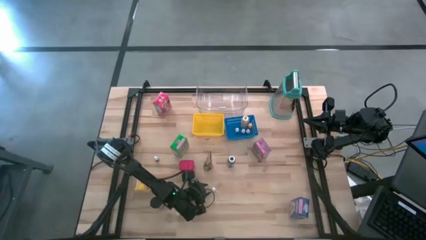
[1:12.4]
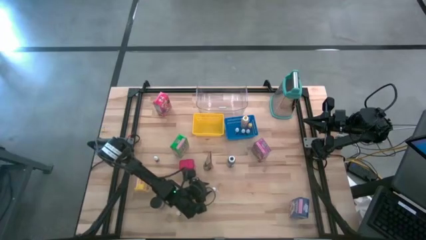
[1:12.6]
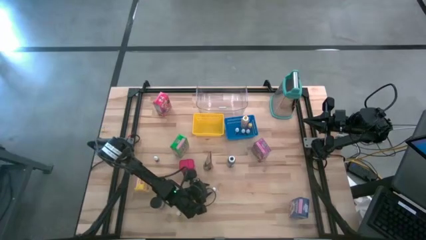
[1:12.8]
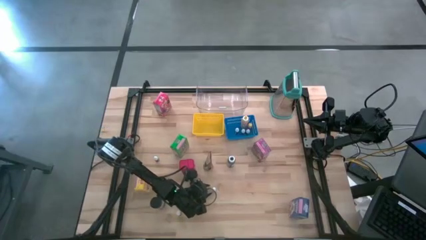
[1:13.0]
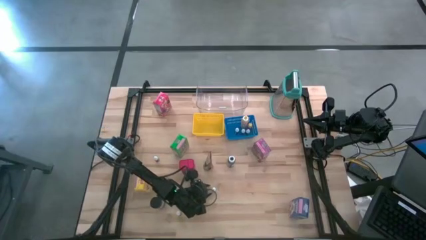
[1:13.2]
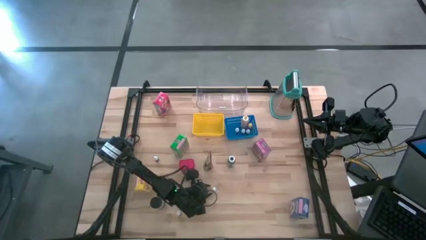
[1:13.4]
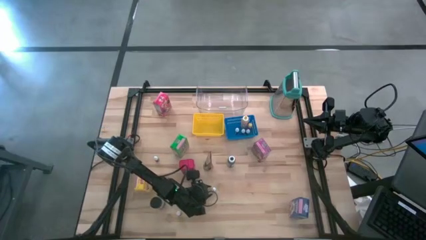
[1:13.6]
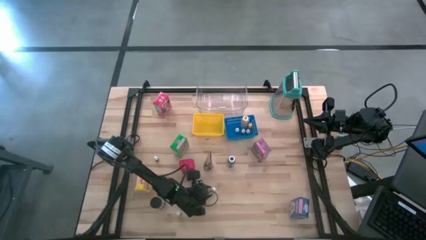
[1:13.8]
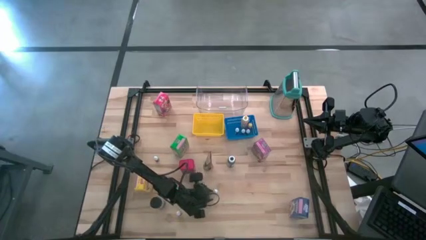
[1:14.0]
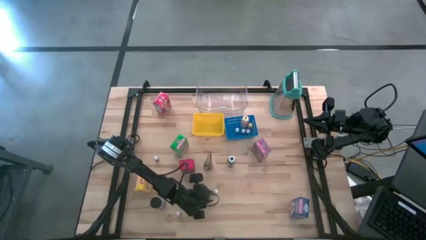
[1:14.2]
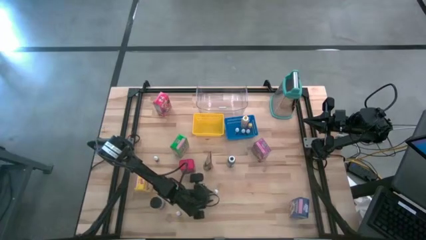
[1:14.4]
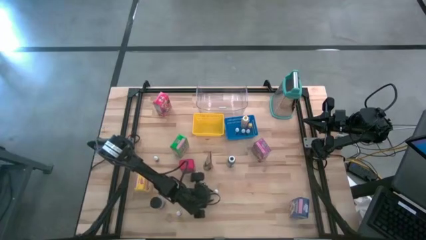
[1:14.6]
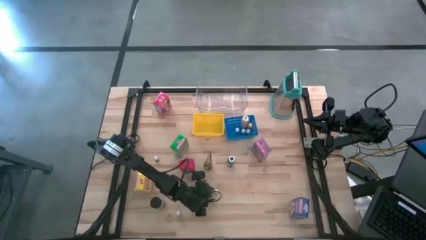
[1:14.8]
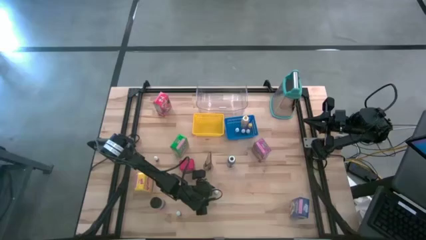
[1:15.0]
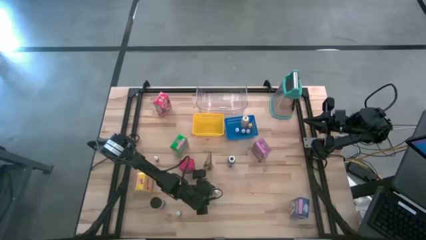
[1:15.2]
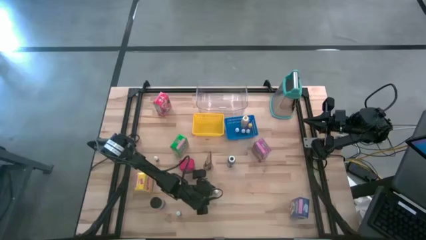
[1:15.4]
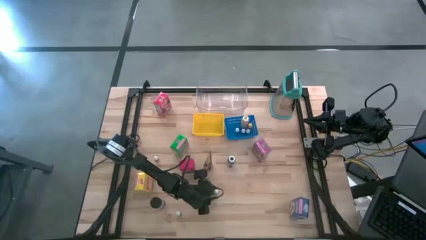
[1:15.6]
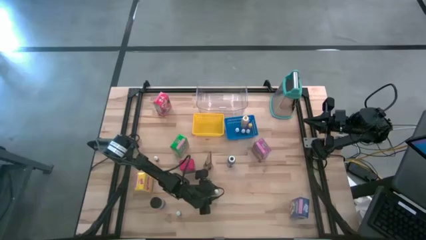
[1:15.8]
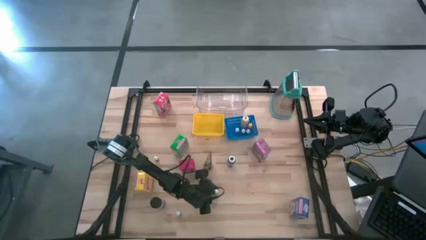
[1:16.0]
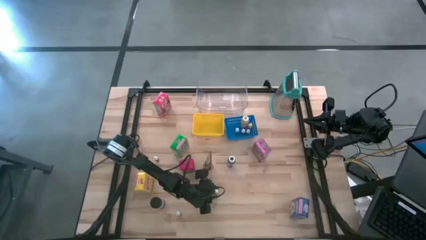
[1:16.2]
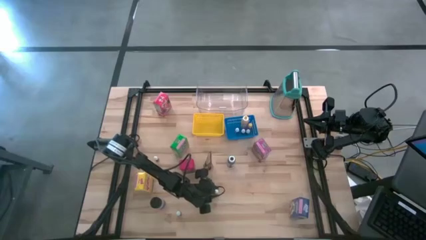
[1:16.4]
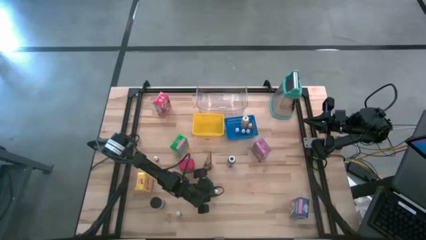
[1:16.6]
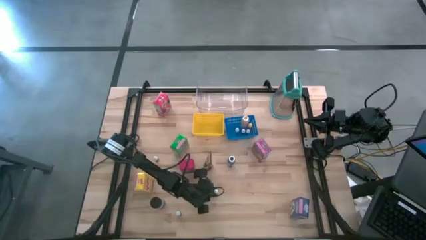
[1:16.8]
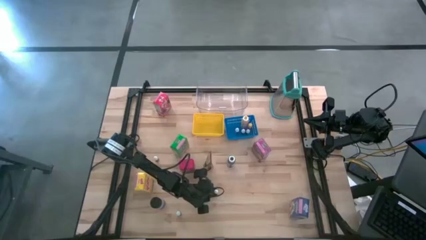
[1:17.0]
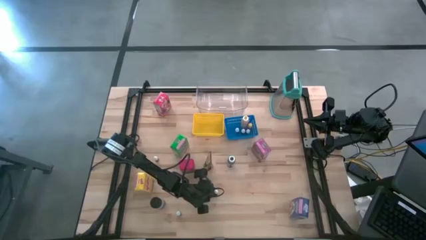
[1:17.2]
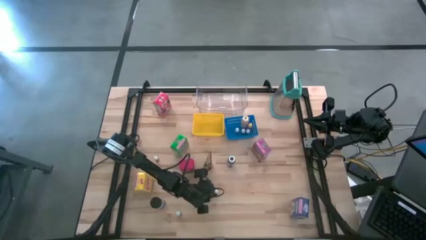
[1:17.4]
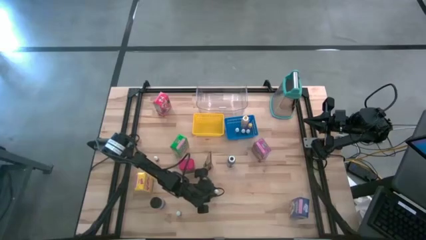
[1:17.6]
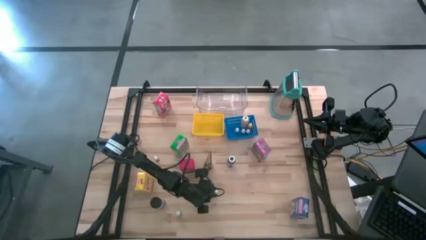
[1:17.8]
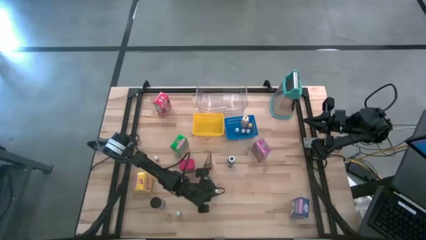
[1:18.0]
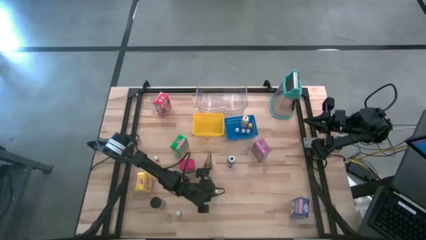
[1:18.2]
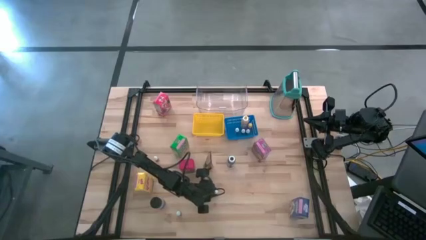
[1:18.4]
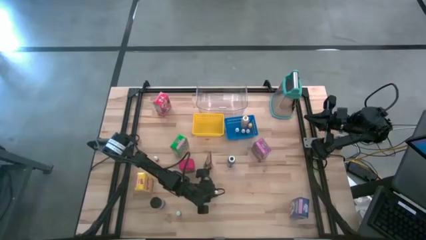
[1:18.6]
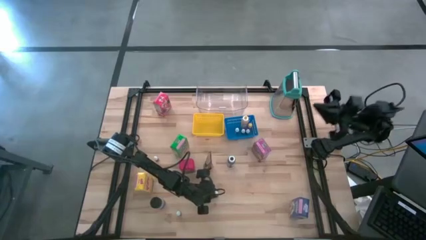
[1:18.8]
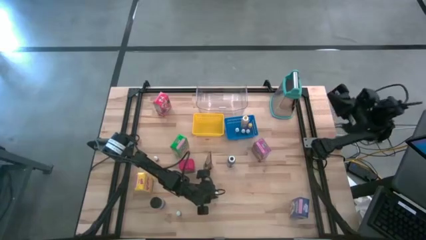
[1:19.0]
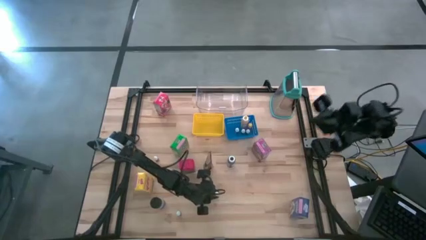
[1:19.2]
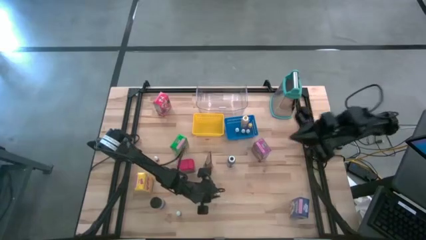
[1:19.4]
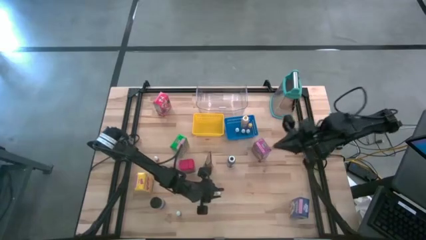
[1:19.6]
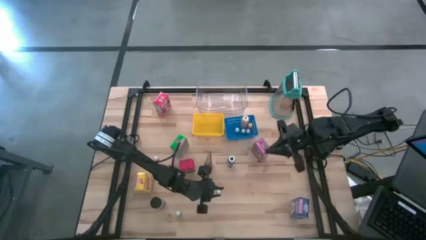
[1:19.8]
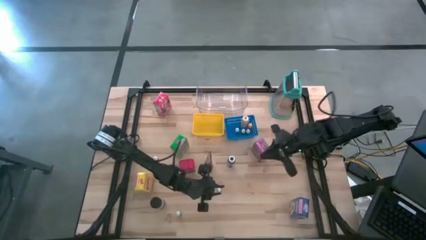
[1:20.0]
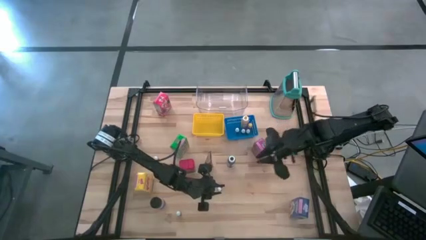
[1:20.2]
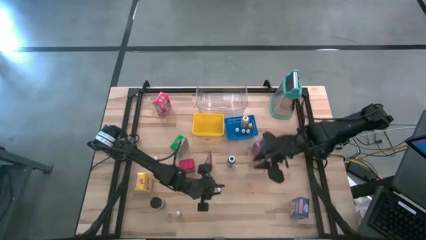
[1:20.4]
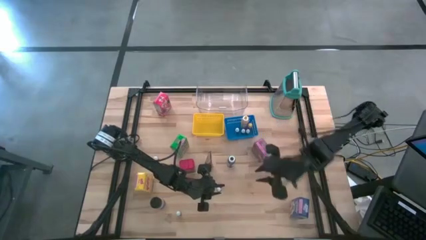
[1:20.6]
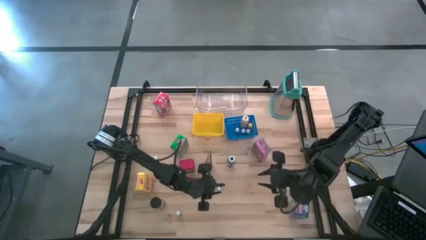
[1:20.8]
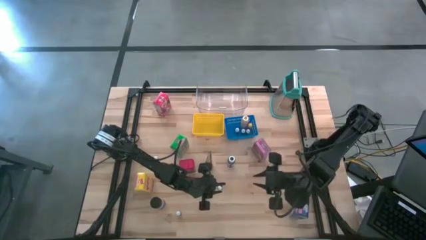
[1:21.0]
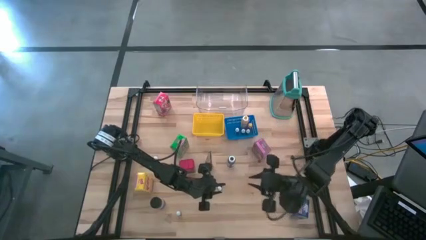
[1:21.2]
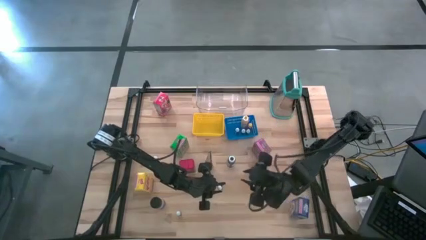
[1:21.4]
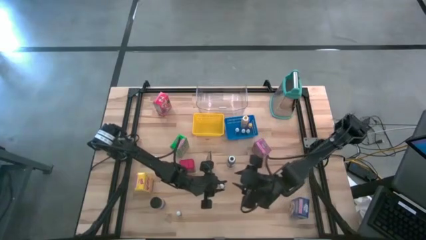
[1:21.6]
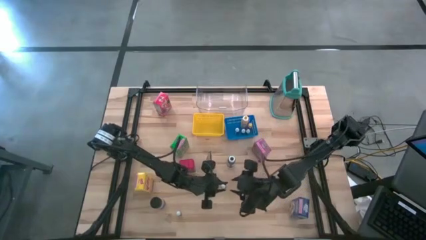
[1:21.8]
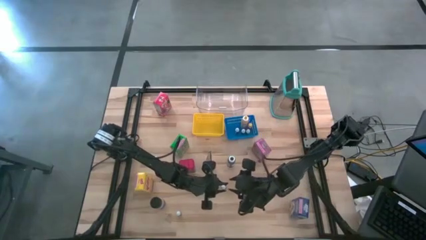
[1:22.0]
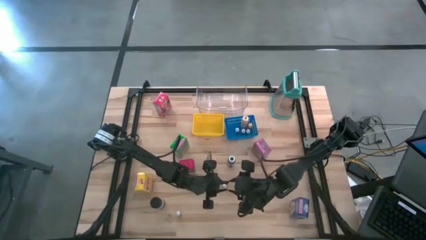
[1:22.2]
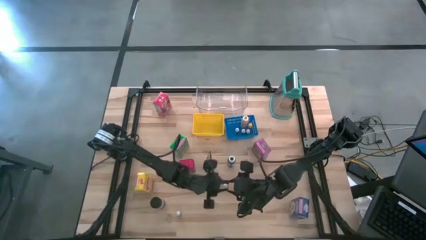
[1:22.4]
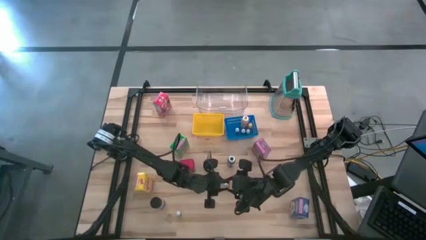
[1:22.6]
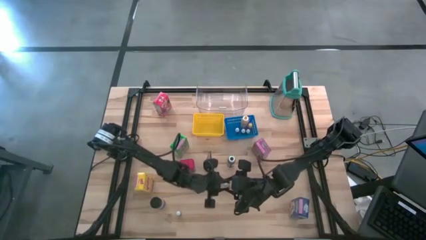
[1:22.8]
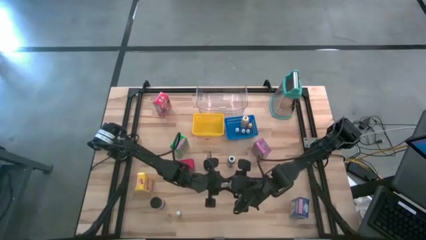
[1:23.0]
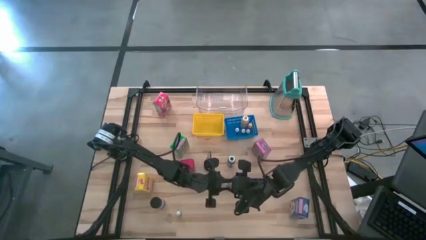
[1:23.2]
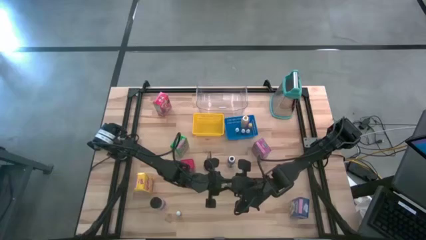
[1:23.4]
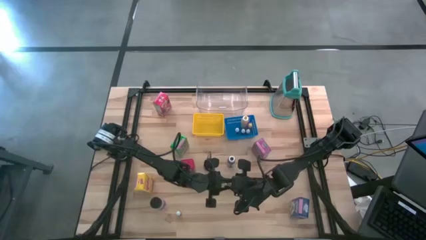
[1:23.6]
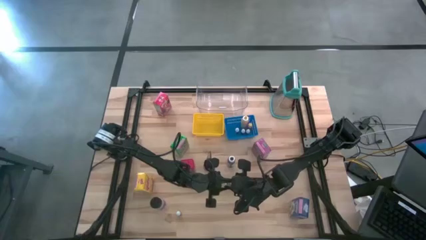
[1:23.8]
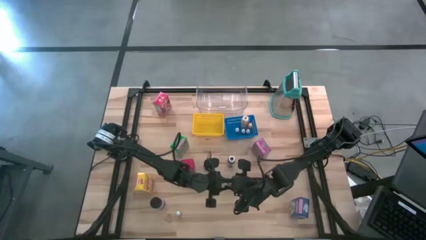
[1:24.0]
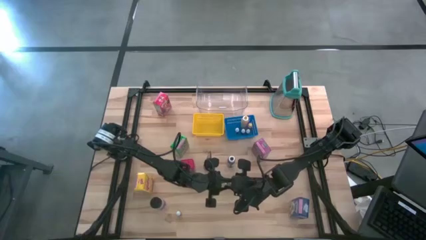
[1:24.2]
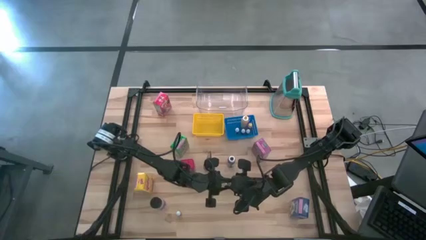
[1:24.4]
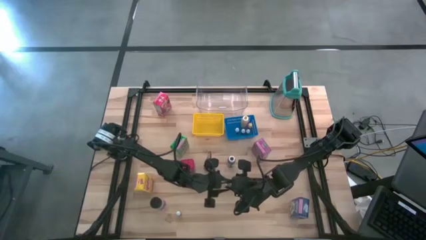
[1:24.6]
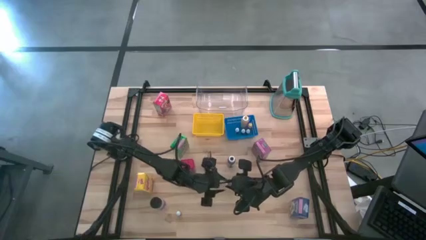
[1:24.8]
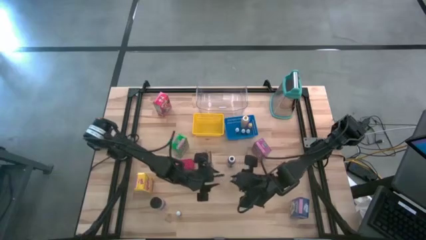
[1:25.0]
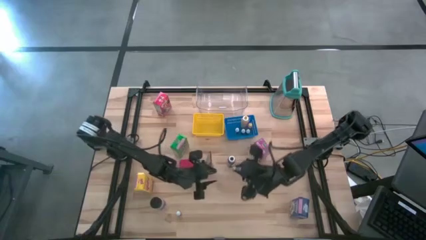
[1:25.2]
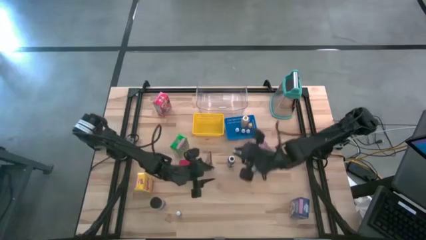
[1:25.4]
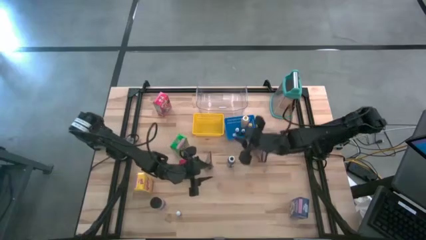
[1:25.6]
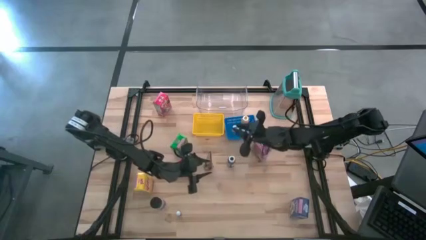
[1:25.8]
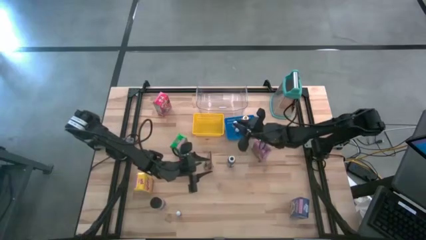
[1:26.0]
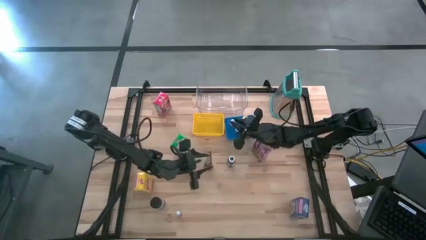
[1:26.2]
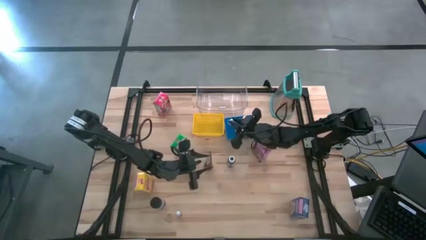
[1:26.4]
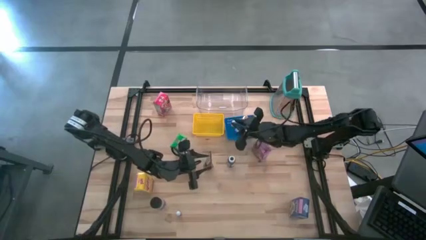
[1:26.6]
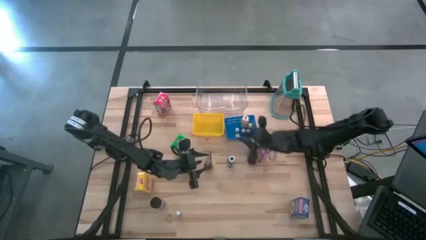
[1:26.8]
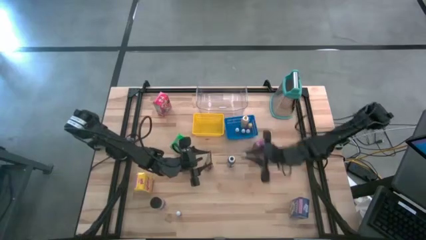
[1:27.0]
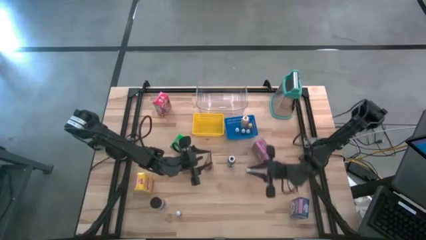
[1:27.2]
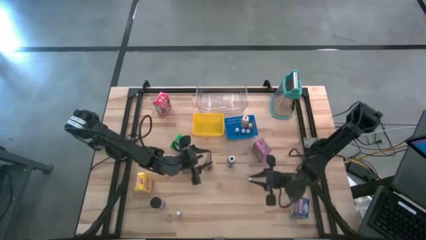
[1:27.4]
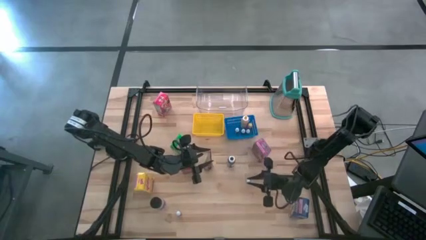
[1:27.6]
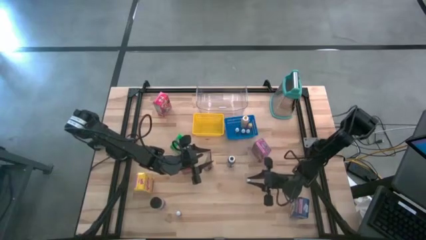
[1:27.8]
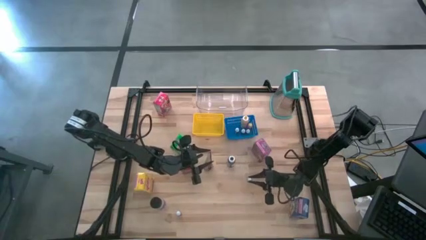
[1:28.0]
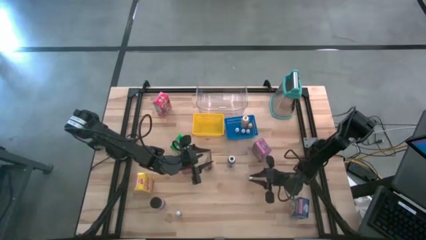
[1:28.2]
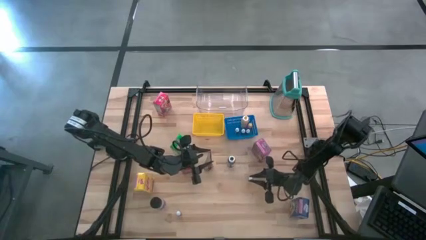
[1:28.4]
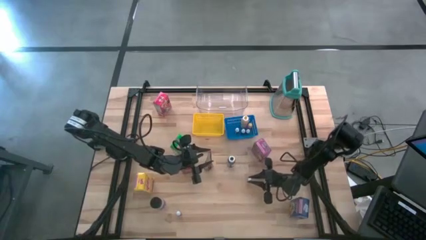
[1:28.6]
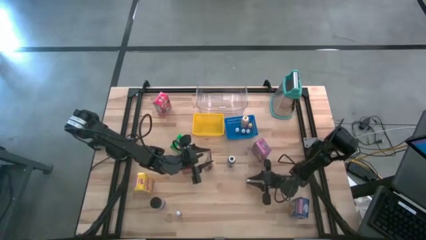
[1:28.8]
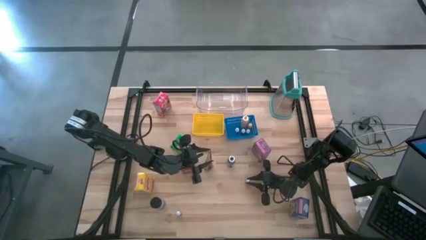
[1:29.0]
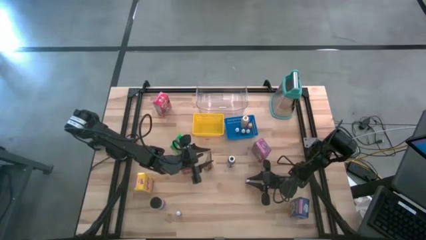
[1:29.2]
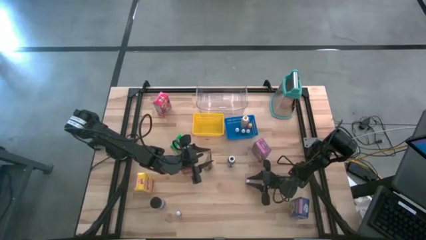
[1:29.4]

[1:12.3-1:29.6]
Task: Pick & Place Kitchen Items
Move the red food coloring bottle
